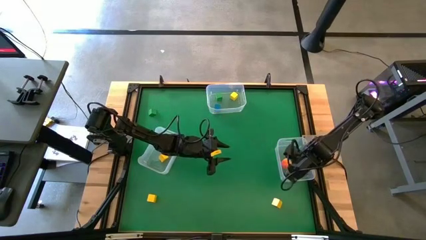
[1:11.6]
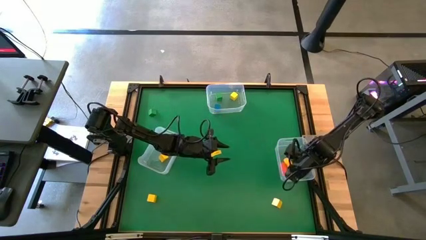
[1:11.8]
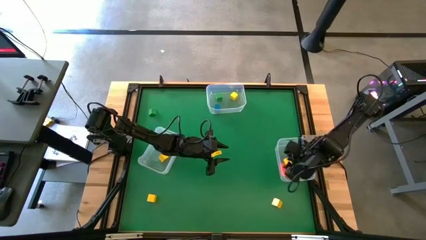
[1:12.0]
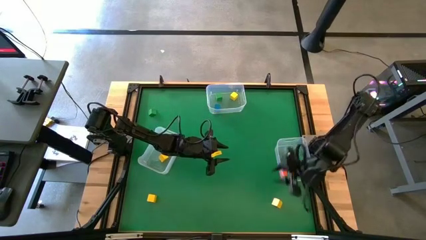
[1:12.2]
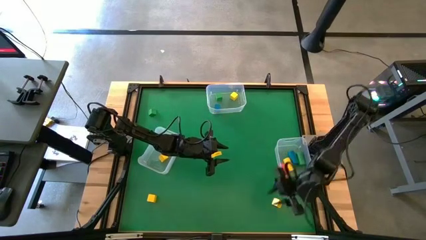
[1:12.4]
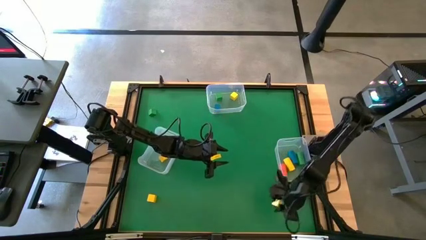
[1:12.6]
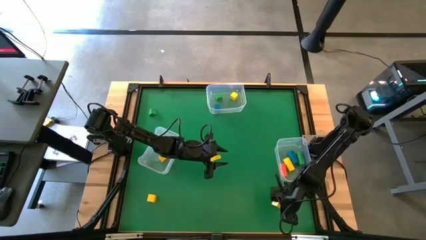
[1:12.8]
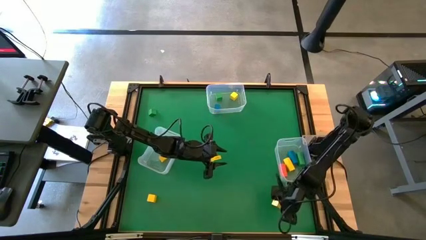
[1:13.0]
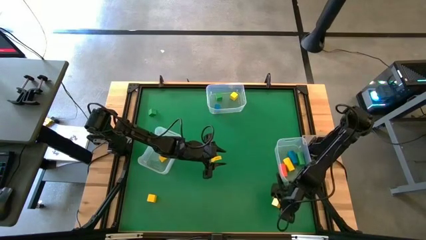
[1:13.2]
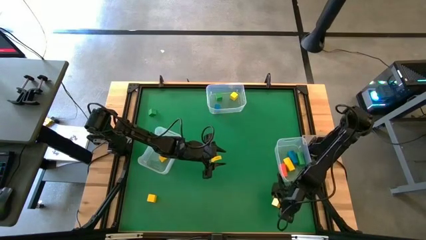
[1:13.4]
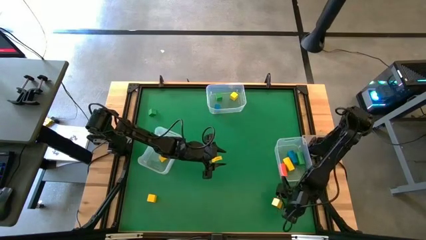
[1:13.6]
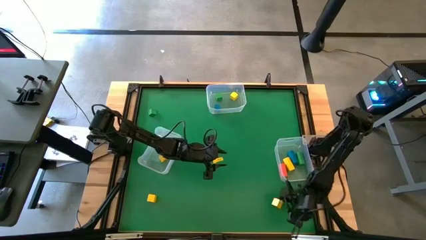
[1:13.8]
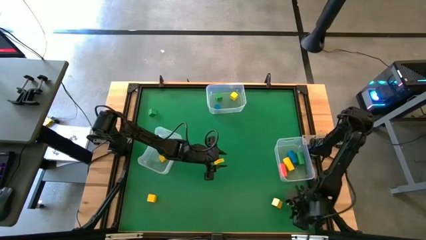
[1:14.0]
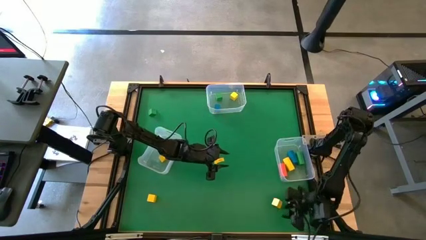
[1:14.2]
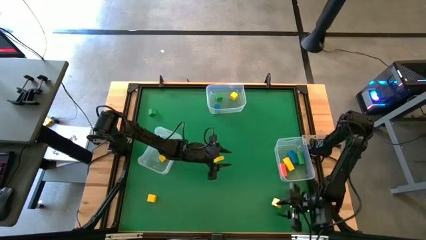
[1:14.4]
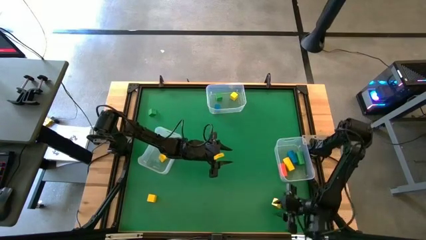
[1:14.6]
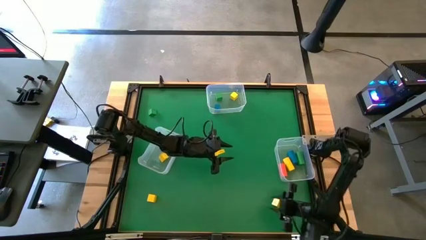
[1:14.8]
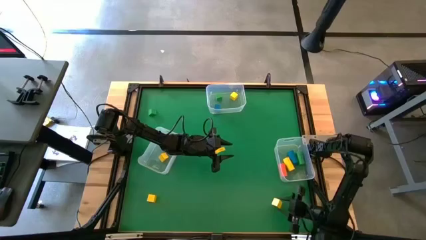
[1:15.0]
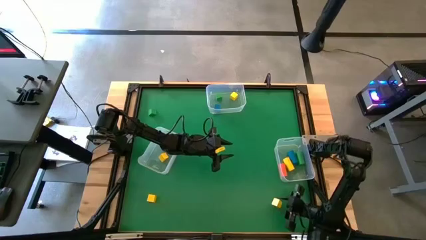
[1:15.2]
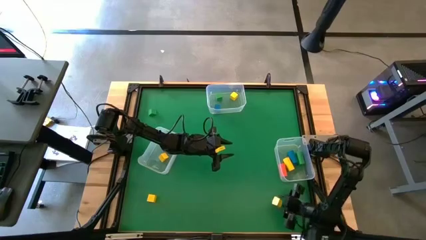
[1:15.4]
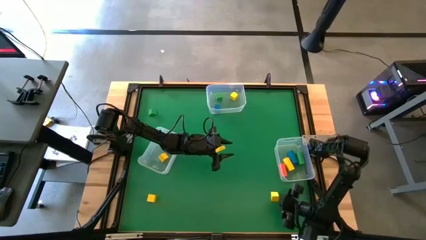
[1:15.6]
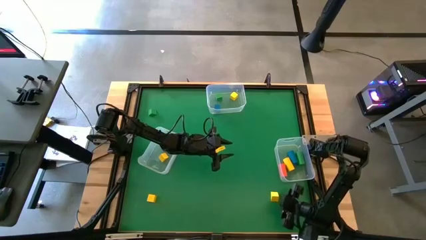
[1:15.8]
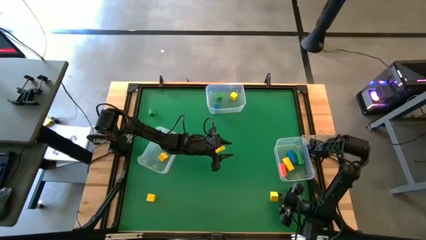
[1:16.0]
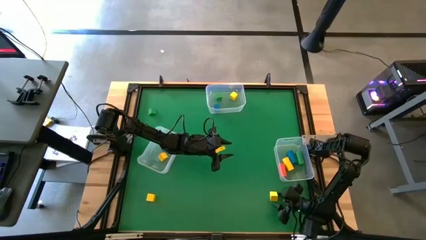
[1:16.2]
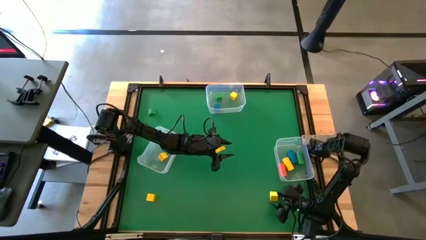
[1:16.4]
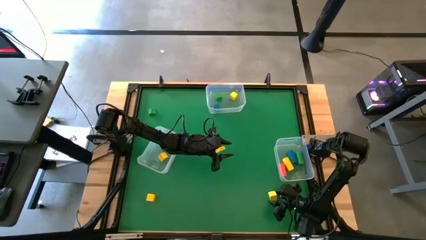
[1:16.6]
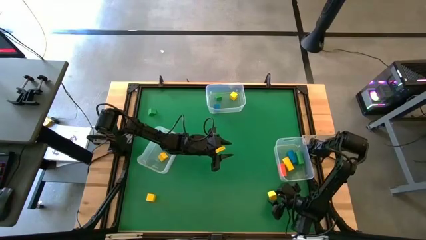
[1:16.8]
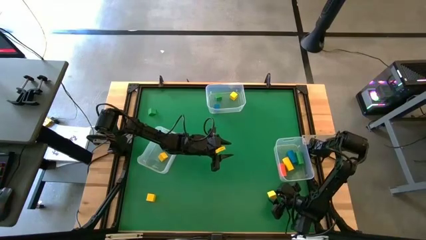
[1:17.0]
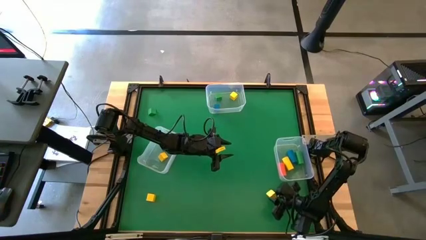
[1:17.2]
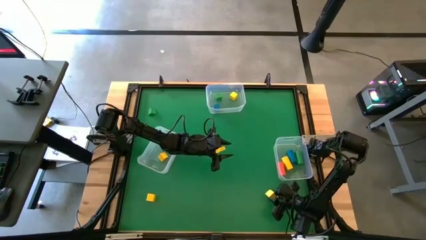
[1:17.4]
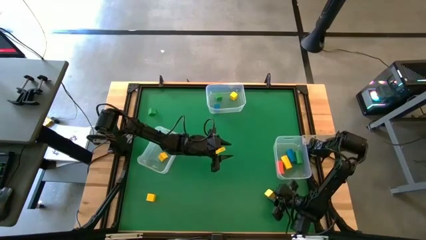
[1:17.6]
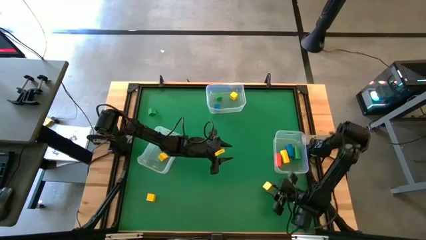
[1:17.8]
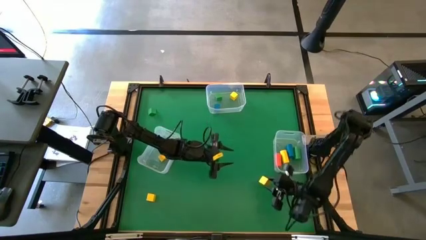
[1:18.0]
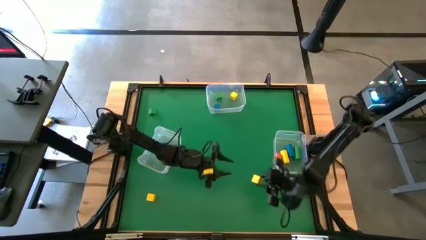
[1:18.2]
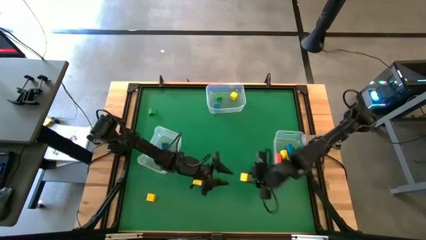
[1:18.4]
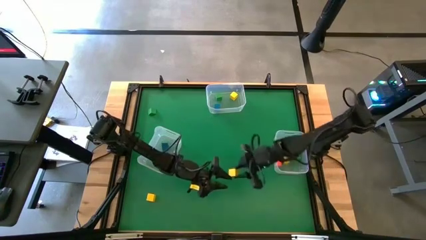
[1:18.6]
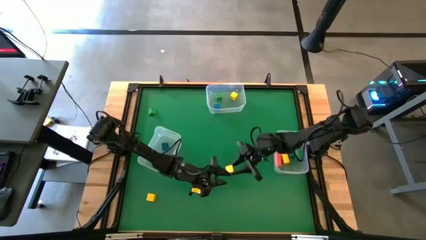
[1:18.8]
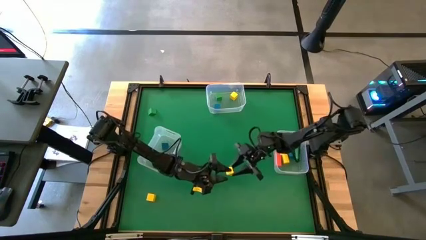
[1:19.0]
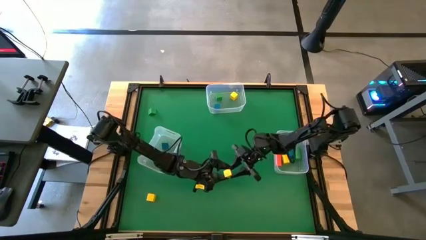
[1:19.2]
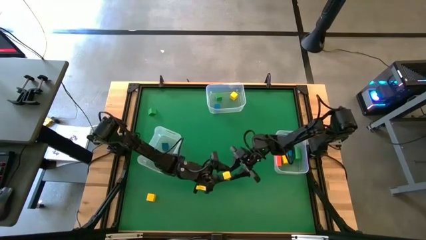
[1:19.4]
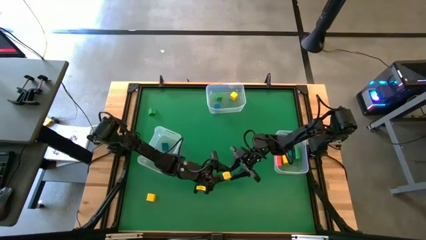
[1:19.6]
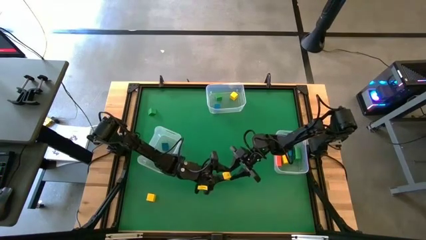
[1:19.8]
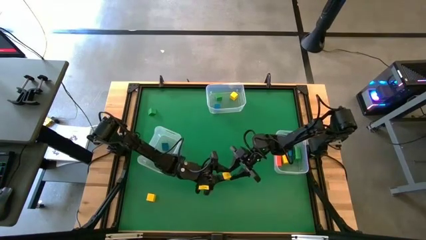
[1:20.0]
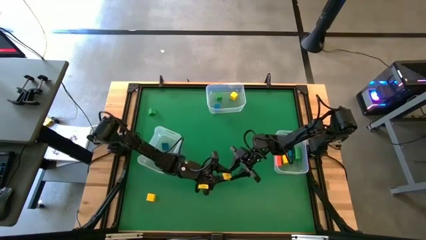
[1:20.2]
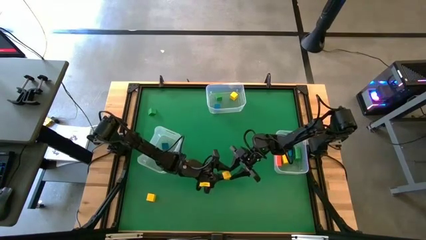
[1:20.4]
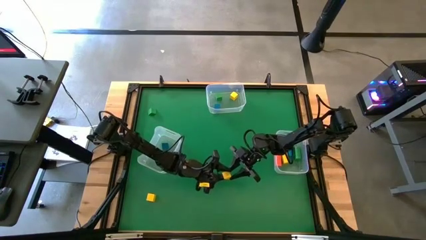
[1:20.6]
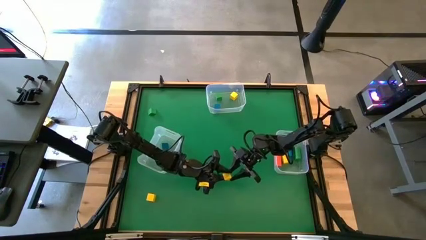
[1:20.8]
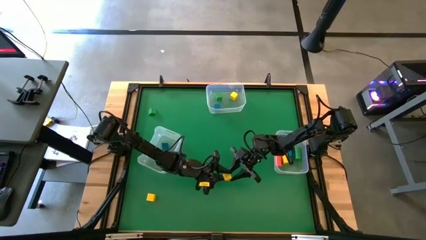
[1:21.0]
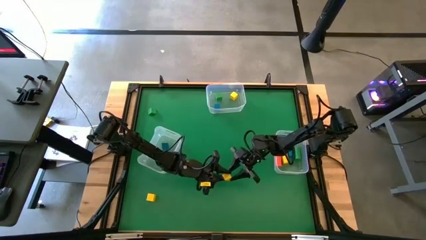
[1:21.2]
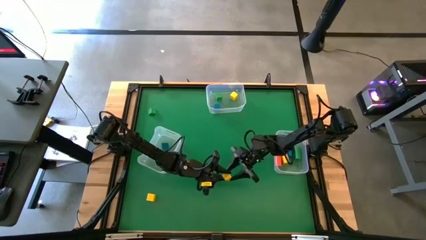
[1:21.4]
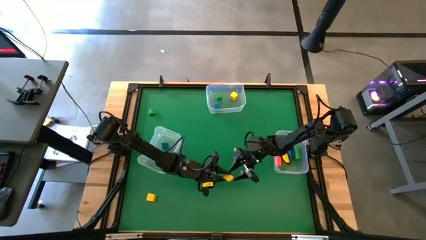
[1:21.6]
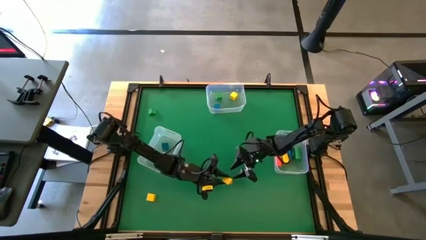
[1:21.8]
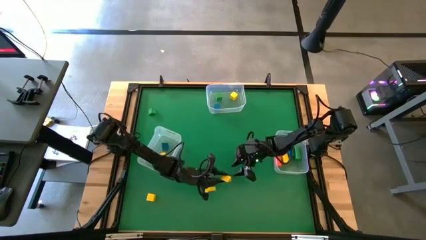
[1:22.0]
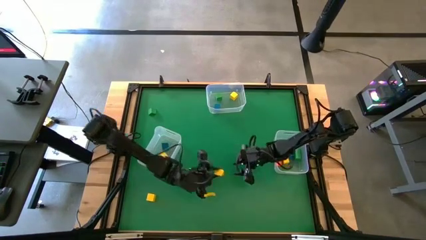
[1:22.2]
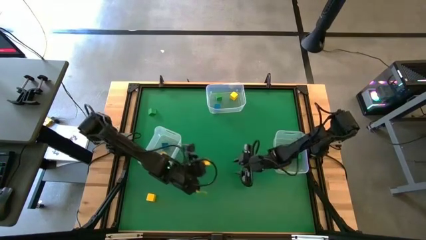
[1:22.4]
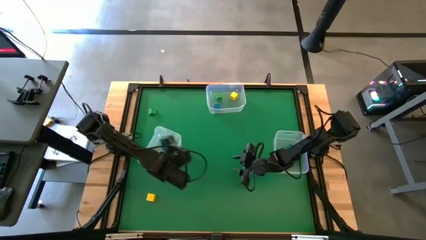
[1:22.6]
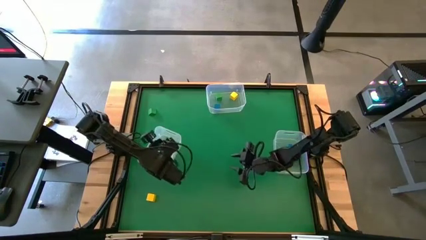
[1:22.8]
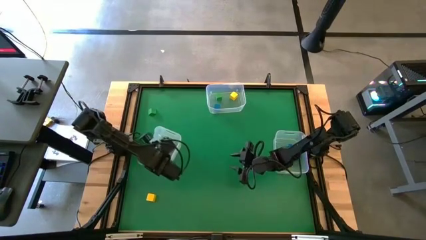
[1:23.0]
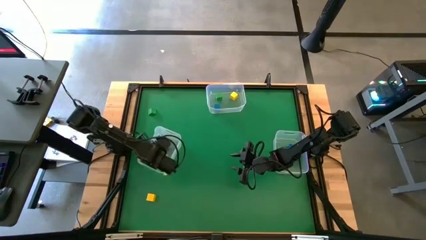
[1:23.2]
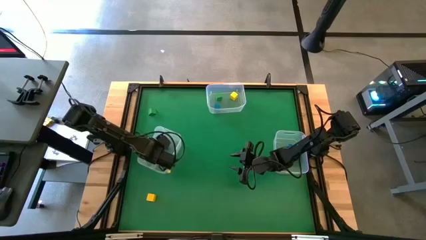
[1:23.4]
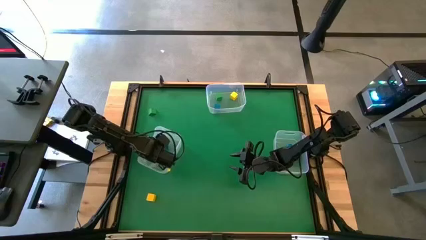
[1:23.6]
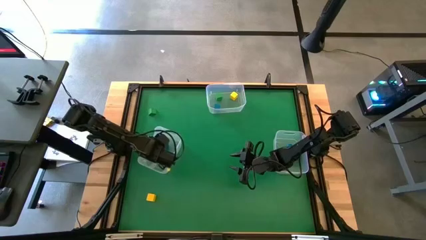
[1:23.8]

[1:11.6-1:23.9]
Task: Sort blocks by size
Put the yellow triangular block into the bottom left transparent bin

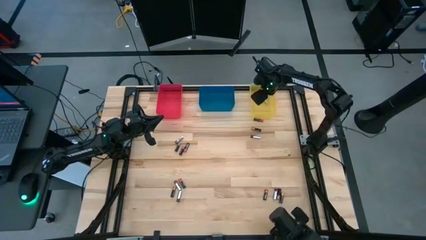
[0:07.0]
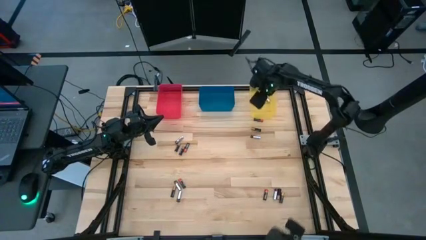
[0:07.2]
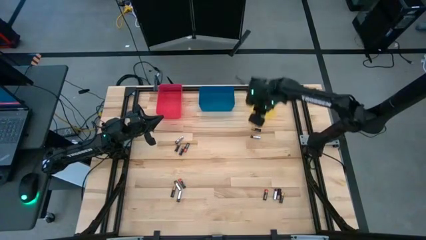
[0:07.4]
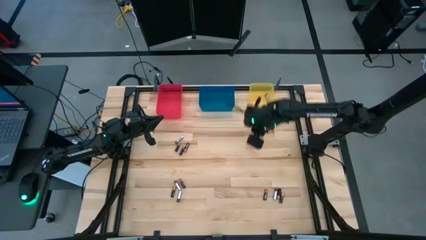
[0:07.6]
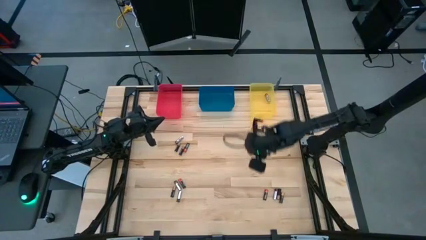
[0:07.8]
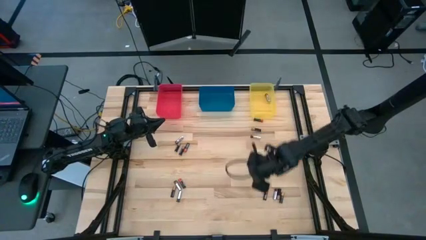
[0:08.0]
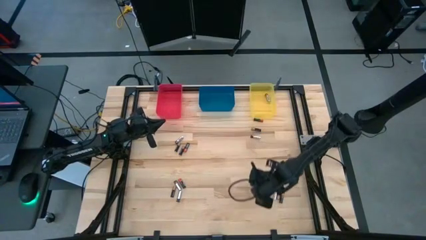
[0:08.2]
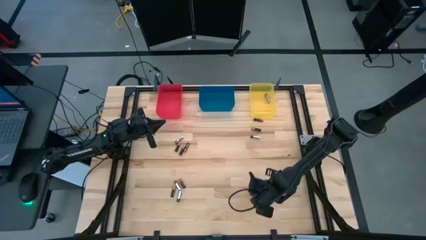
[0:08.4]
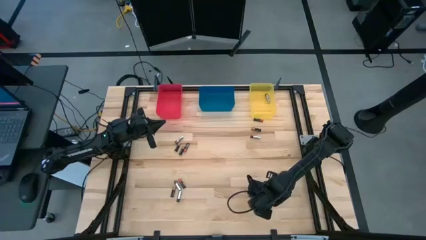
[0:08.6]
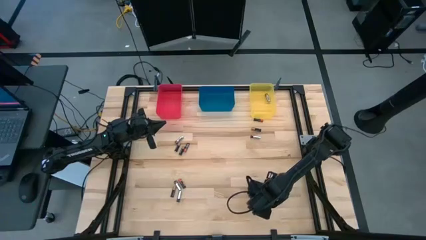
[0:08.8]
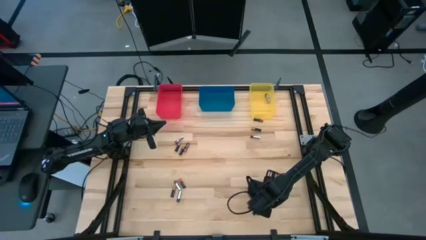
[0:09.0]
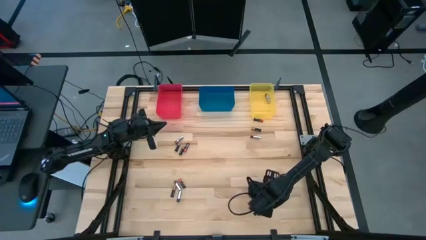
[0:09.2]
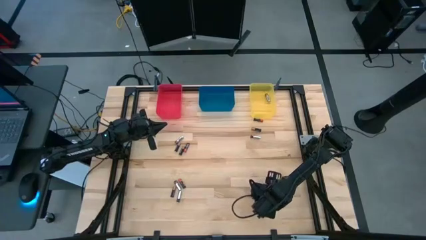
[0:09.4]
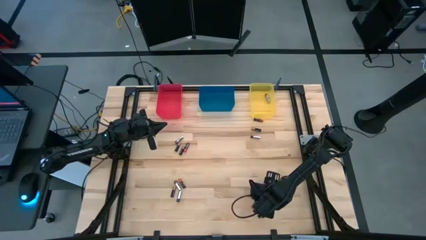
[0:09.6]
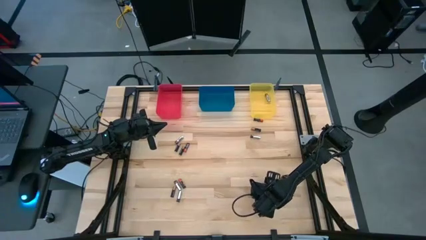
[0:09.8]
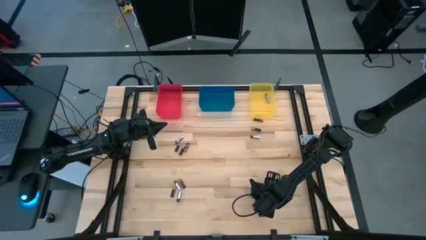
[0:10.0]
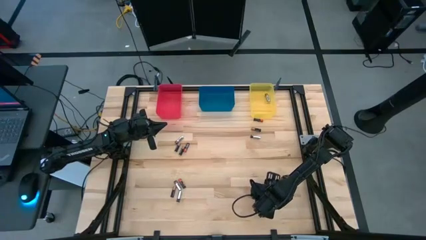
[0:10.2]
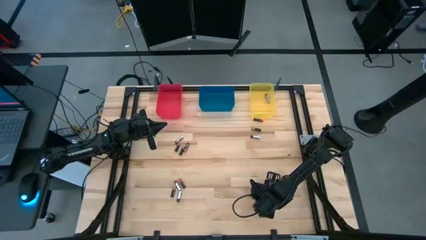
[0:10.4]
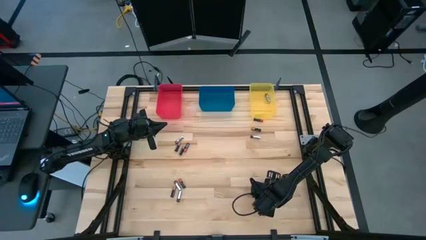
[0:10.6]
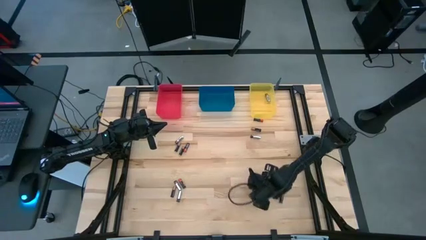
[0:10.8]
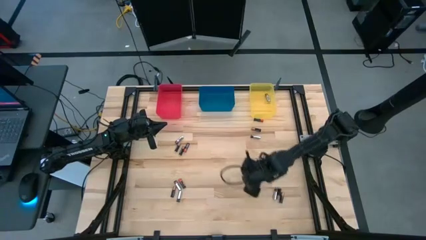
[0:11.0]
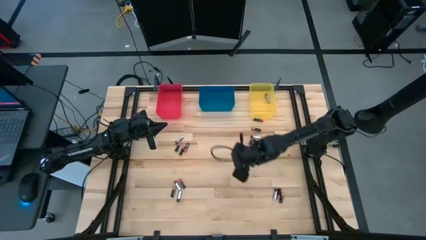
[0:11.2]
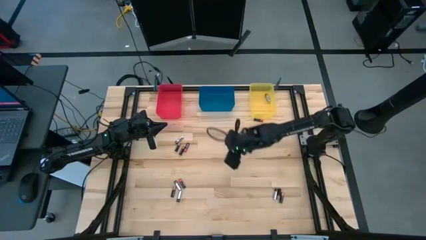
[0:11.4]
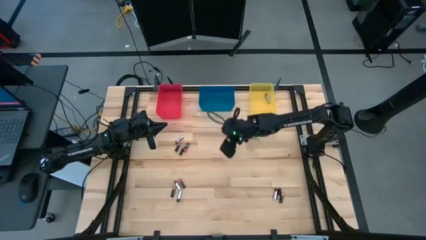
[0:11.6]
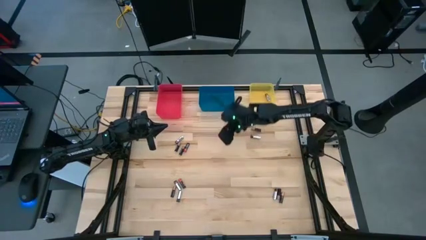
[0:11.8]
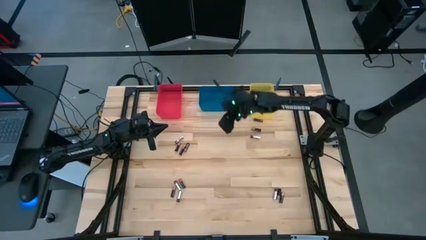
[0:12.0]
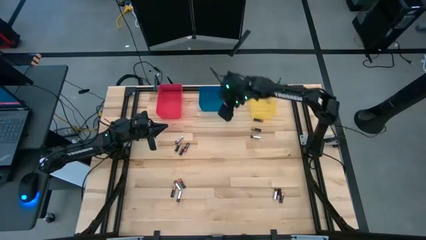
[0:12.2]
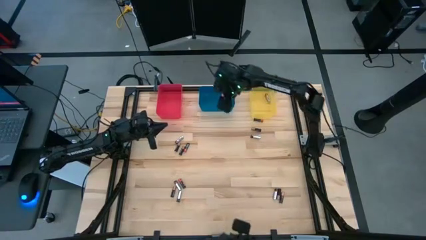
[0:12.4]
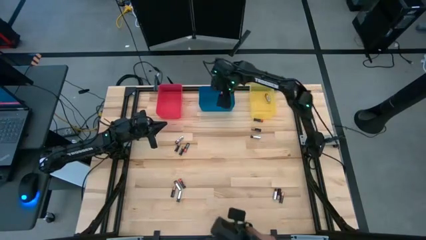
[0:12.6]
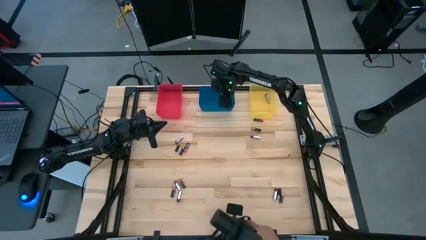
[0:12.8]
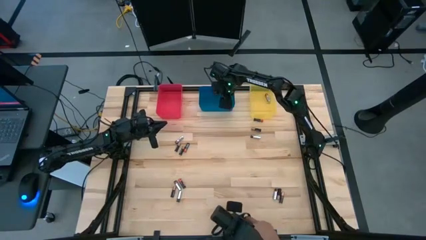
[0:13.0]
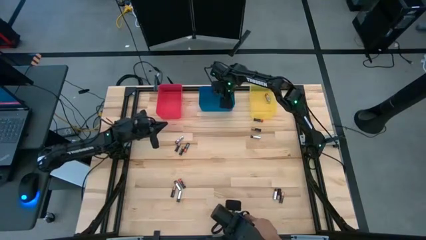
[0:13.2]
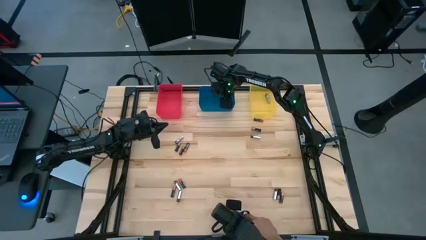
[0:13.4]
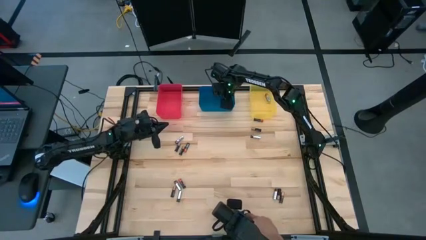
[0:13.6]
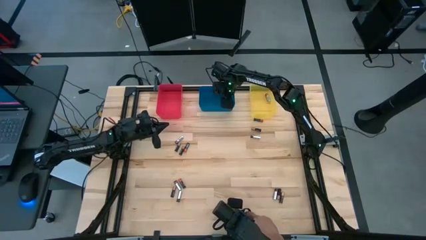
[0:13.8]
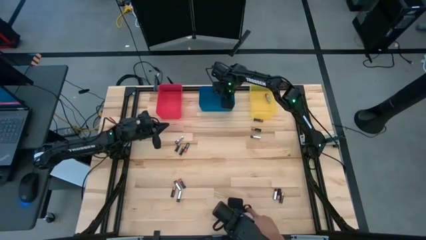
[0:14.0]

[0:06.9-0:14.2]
Task: Sort batteries
Put the orange battery into the blue bin
